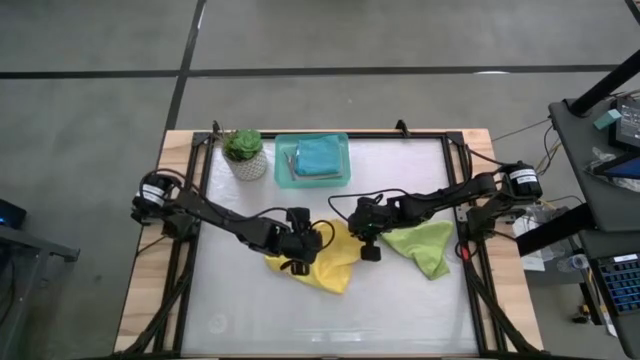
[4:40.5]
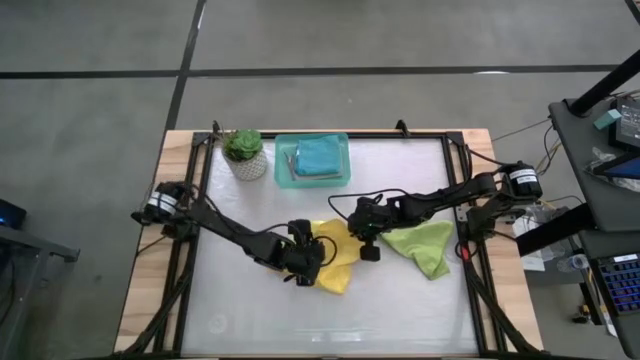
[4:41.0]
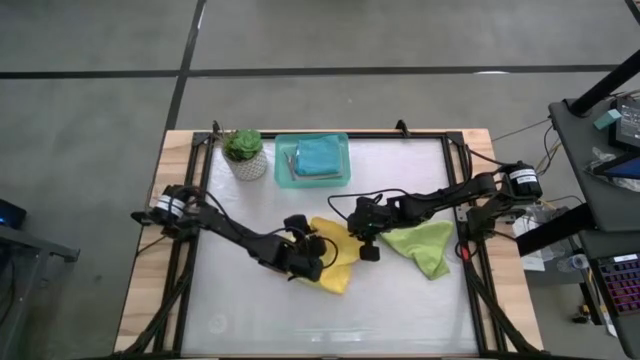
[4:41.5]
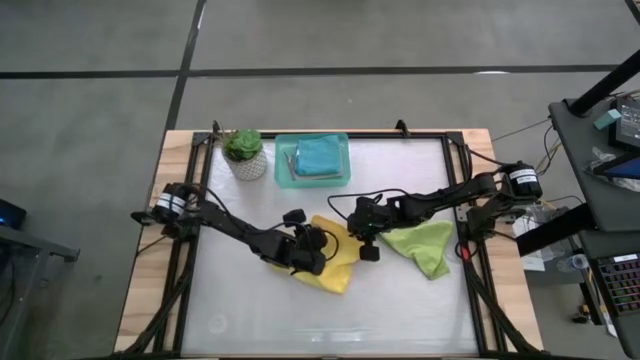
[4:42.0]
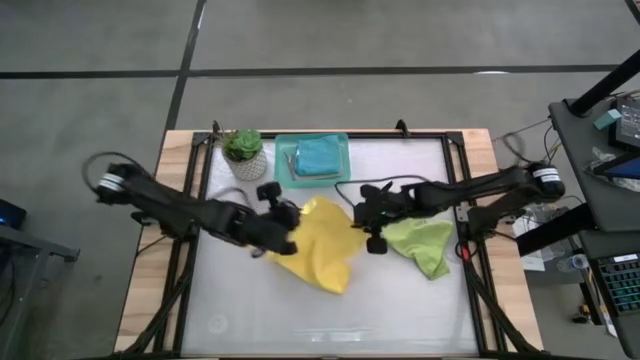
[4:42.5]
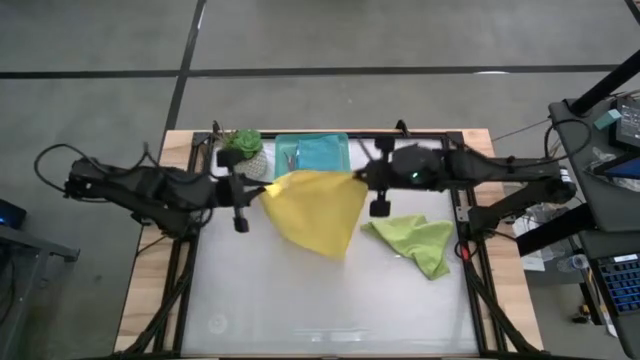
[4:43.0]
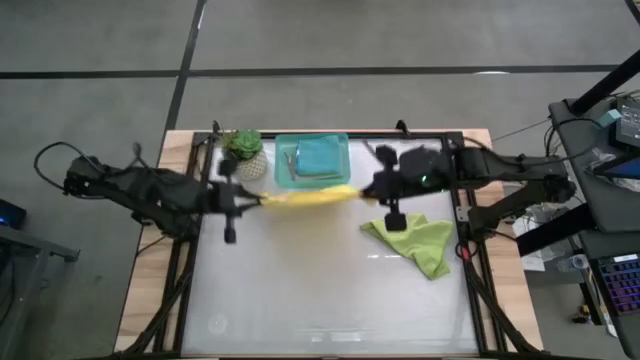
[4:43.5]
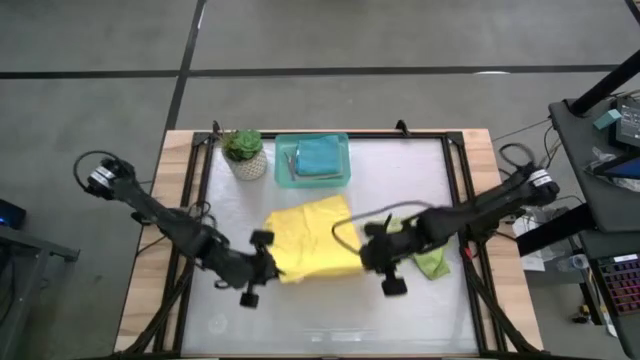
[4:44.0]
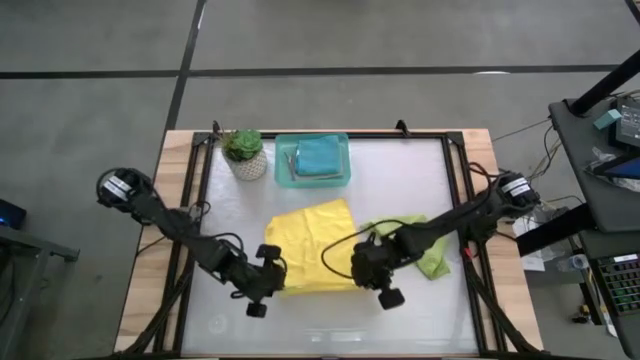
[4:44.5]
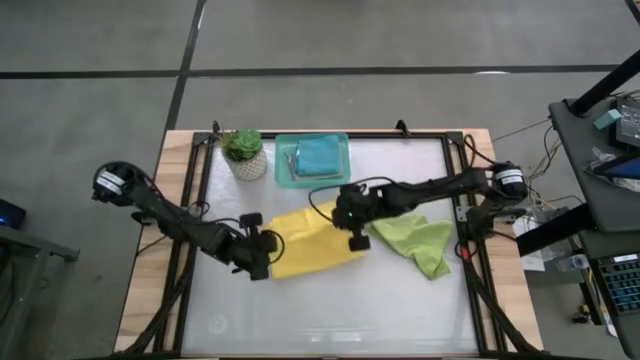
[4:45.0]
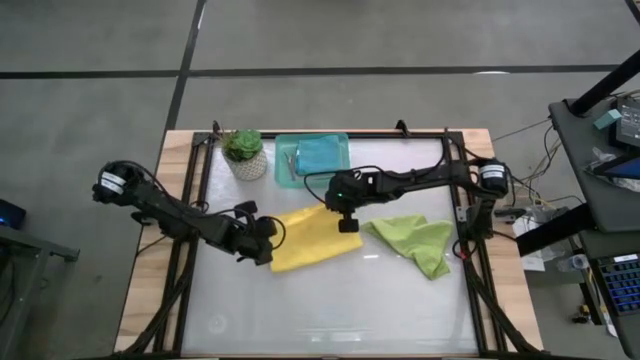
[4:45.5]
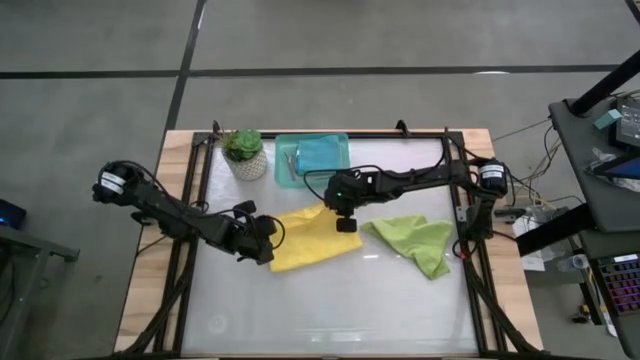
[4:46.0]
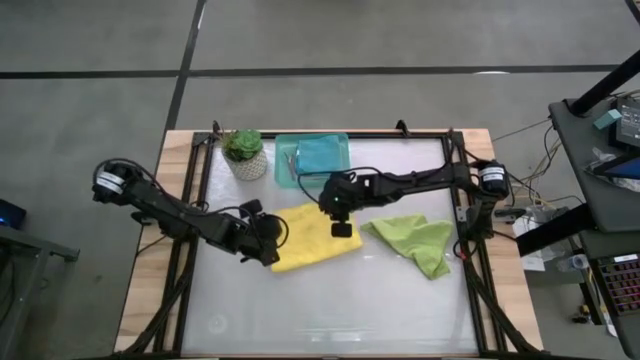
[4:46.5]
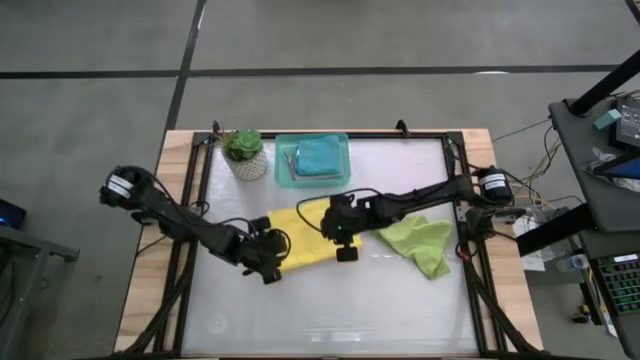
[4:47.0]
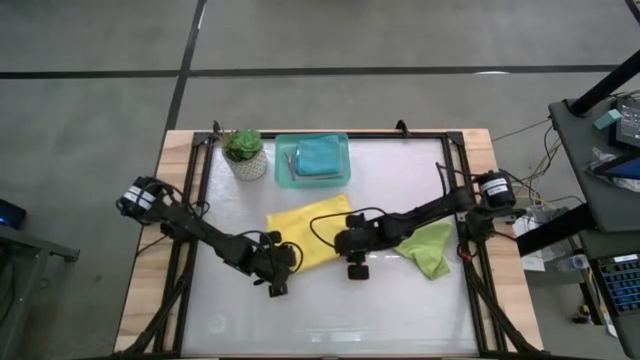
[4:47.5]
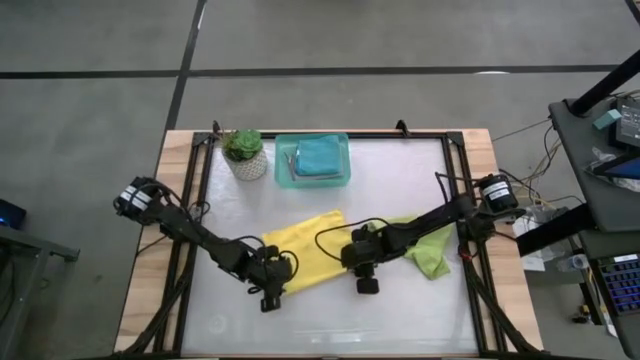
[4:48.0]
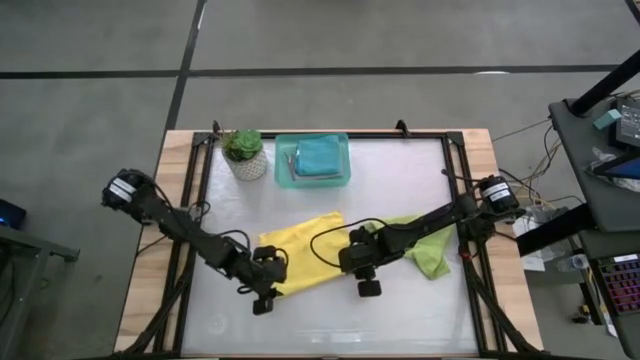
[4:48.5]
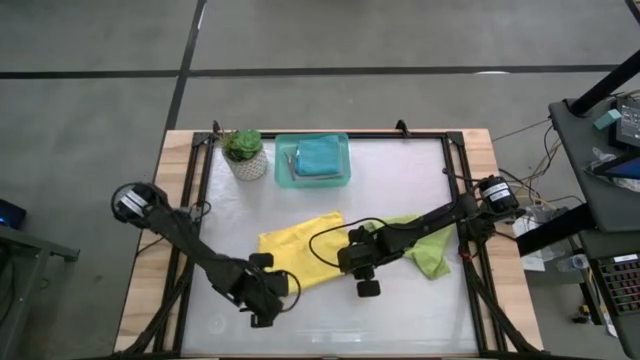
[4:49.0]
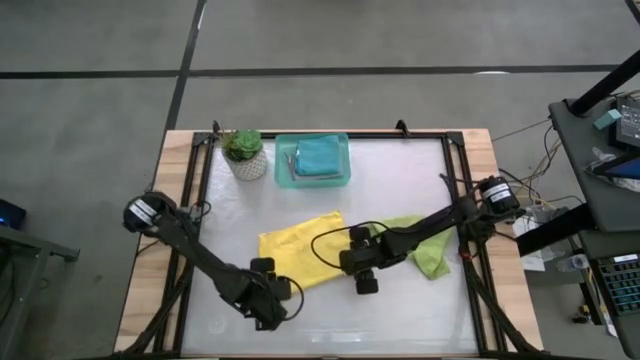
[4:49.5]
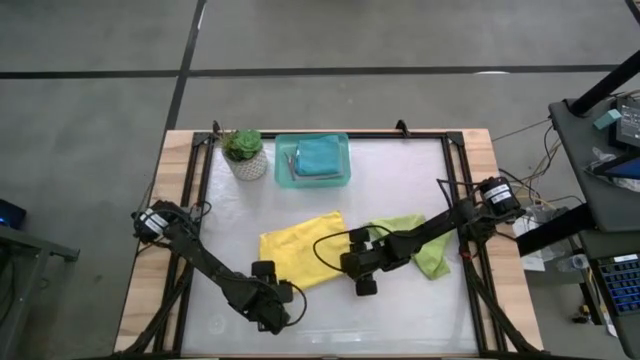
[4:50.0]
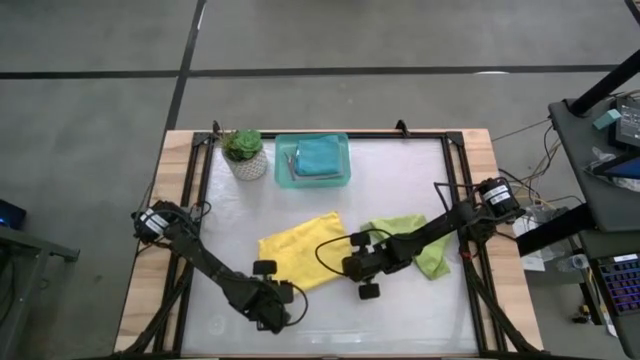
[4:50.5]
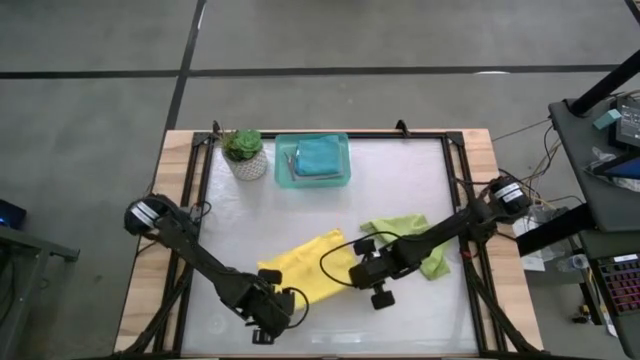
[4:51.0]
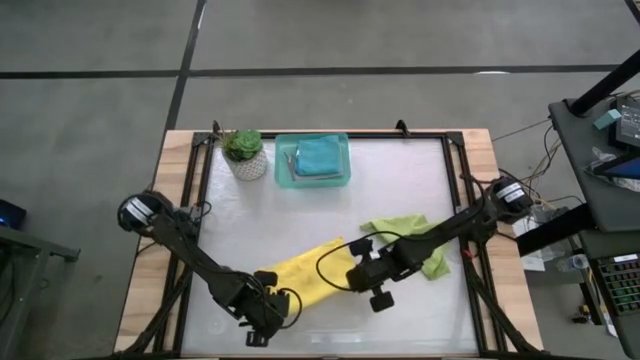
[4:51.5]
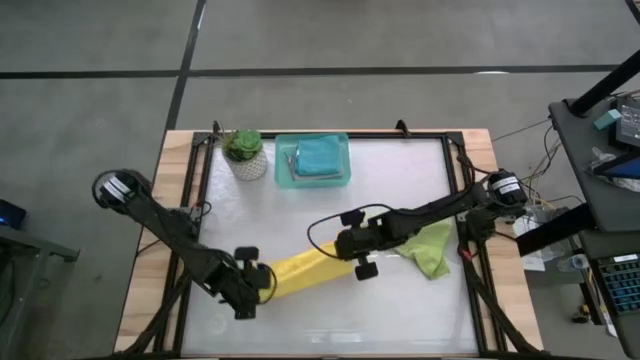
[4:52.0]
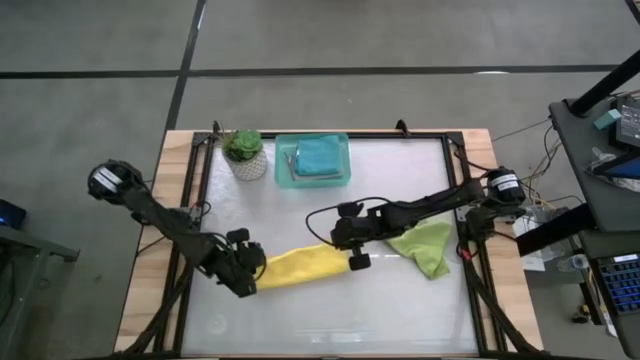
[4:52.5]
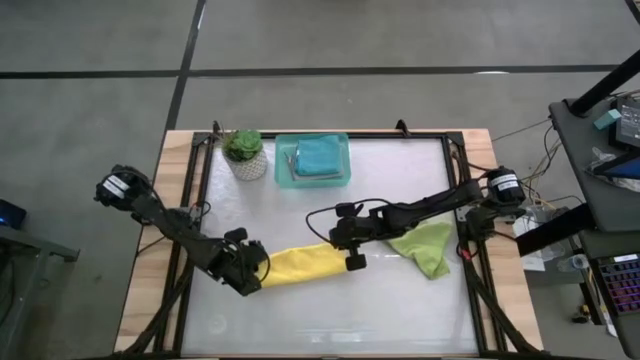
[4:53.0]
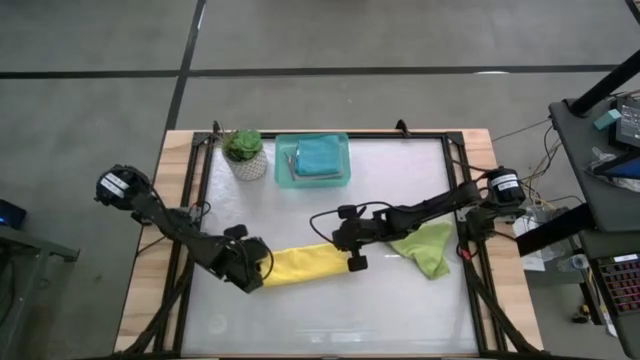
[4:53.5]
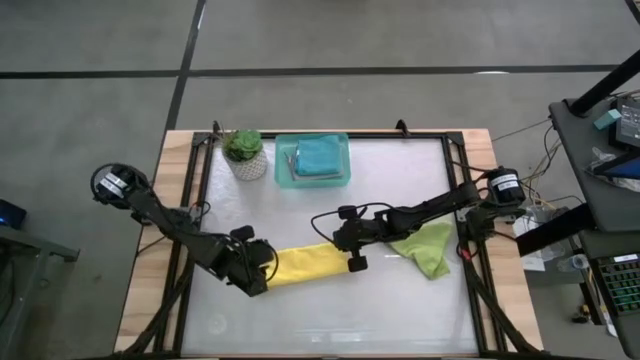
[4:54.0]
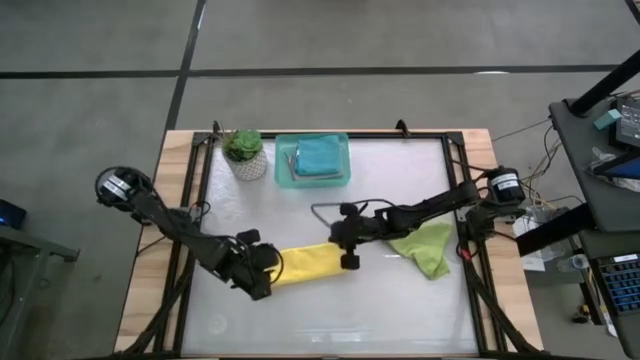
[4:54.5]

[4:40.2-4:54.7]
Task: Fold microfiber towels
Fold the yellow microfiber cloth

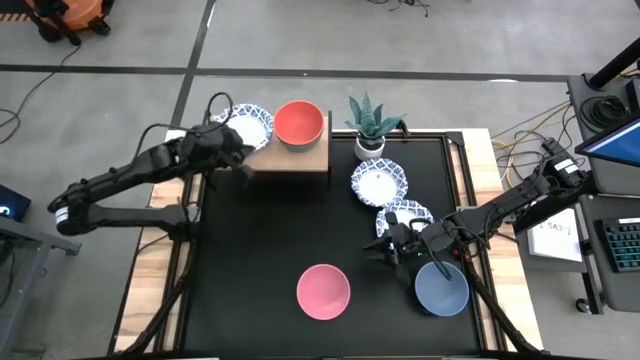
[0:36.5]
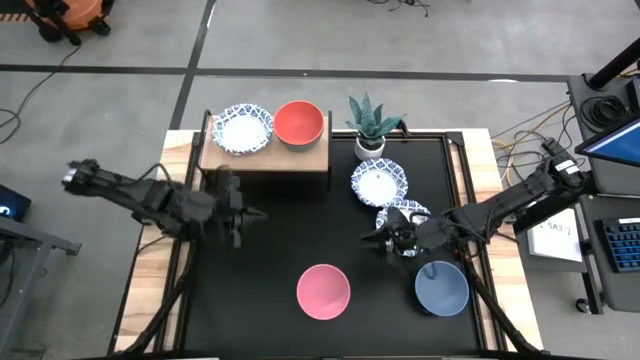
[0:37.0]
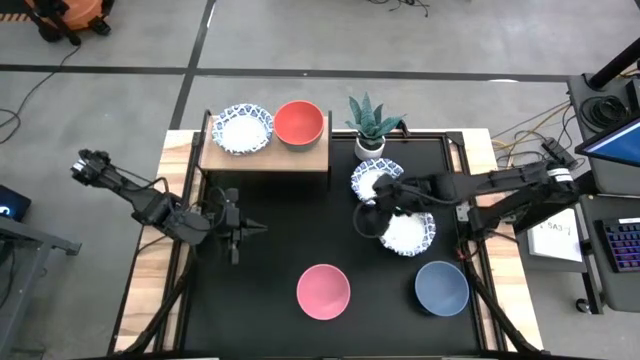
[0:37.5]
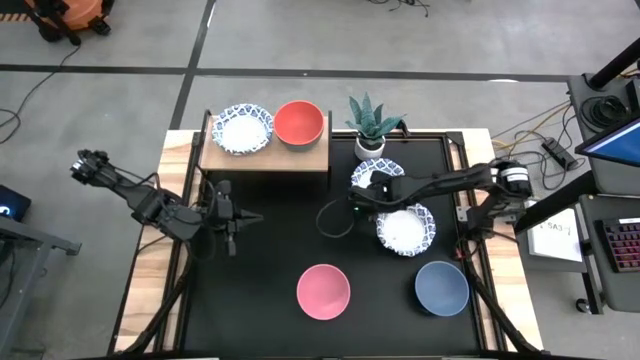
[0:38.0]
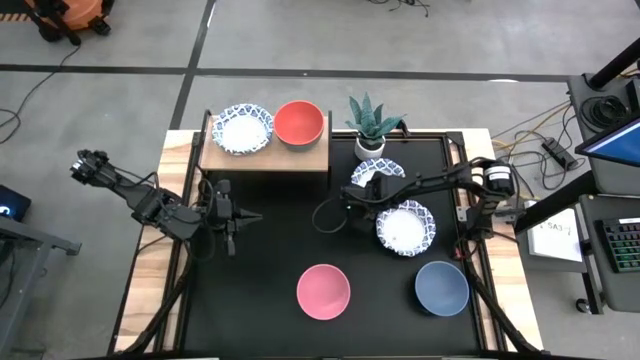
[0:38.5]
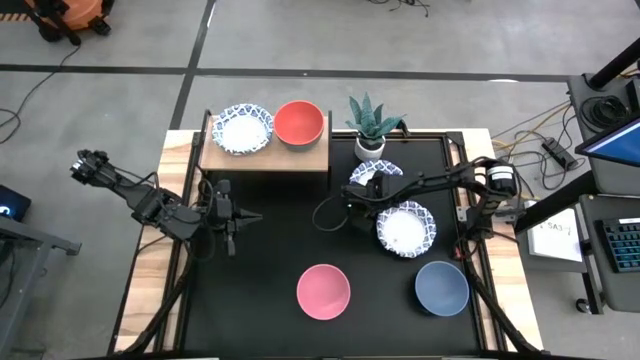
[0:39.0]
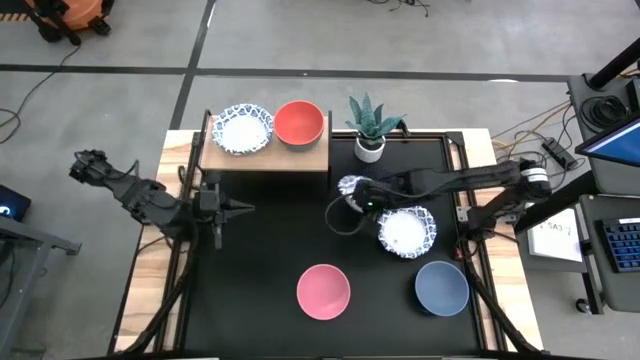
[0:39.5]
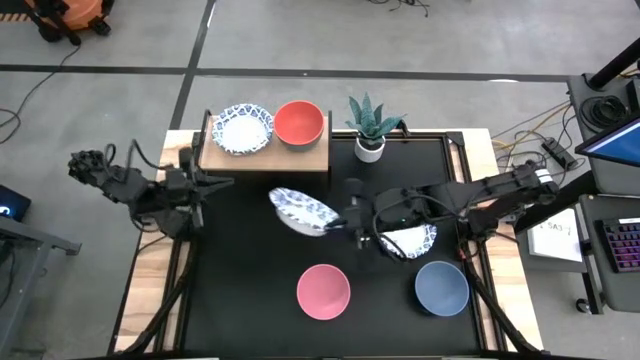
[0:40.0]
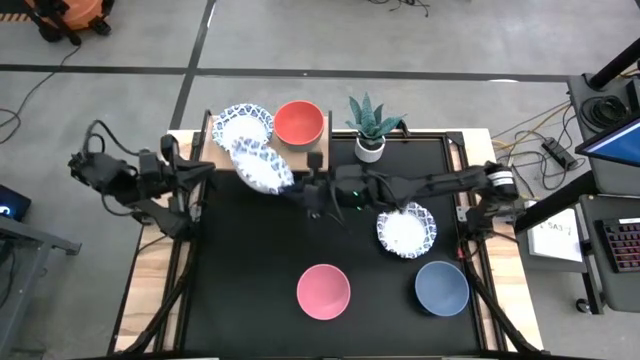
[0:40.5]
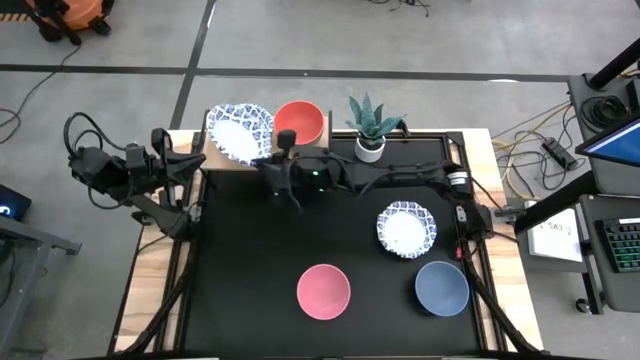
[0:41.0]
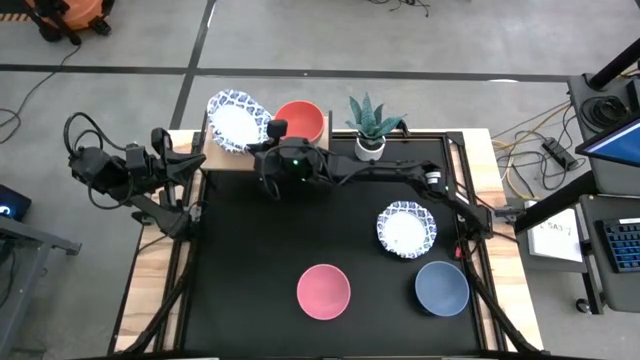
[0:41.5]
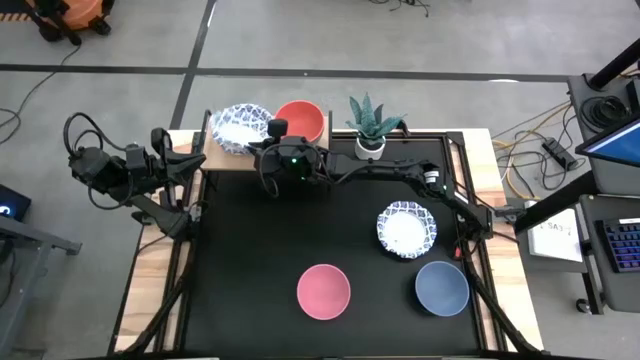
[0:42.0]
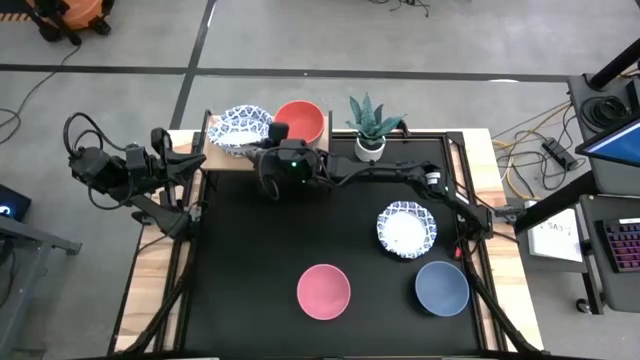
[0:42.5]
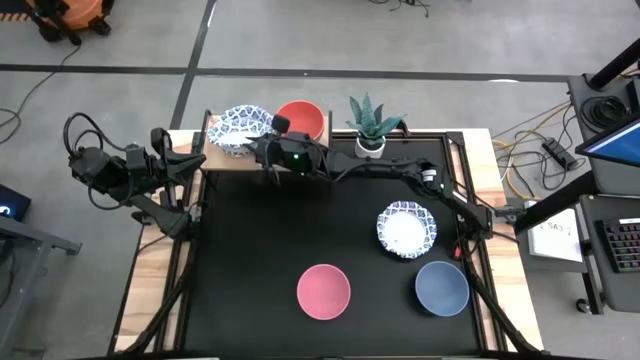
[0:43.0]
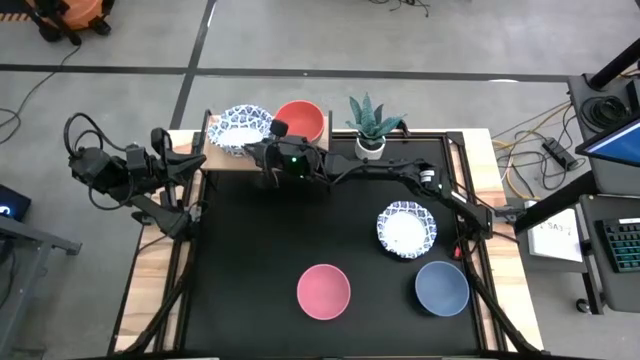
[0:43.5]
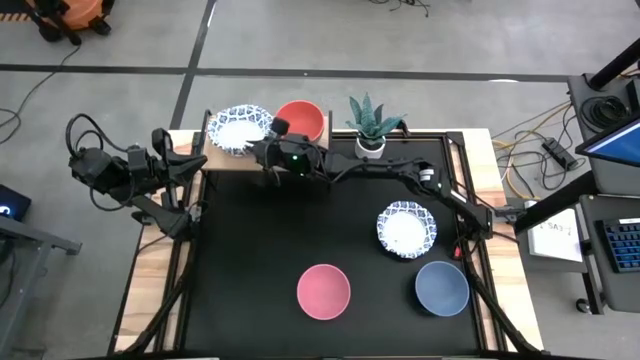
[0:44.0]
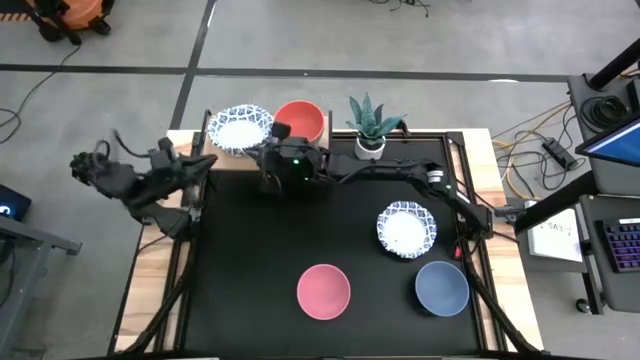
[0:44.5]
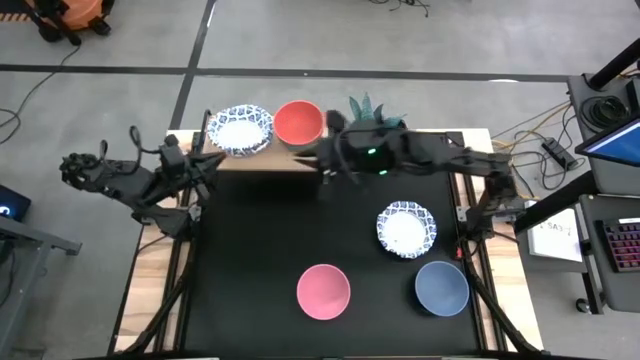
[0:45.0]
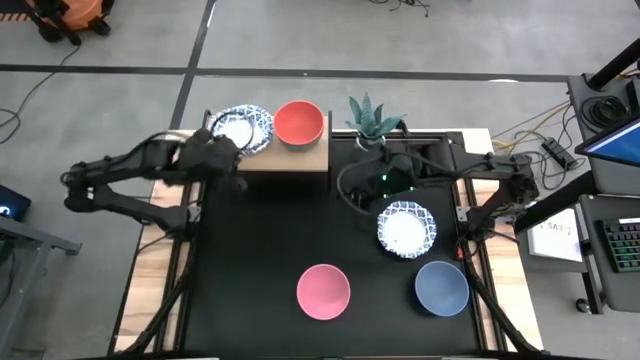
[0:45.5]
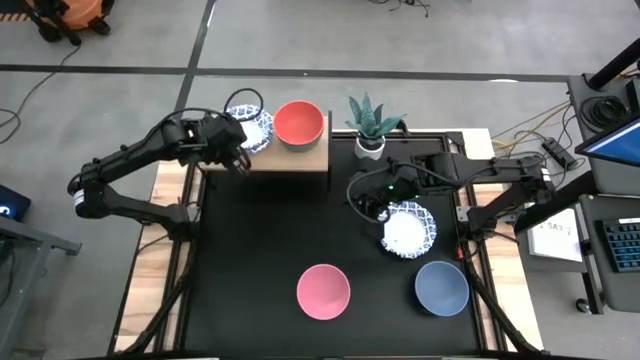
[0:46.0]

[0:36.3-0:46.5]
Task: Place and stack bowls onto a shelf
Stack the white bowl on top of the white bowl on the shelf
